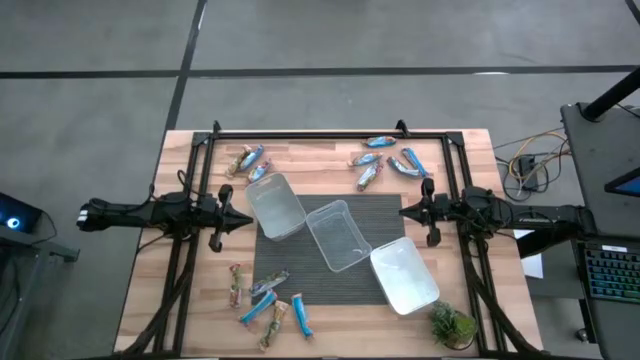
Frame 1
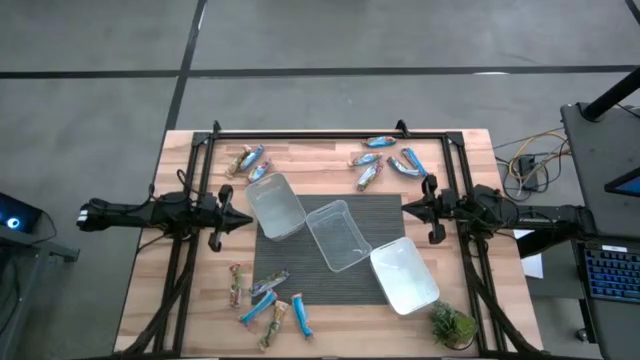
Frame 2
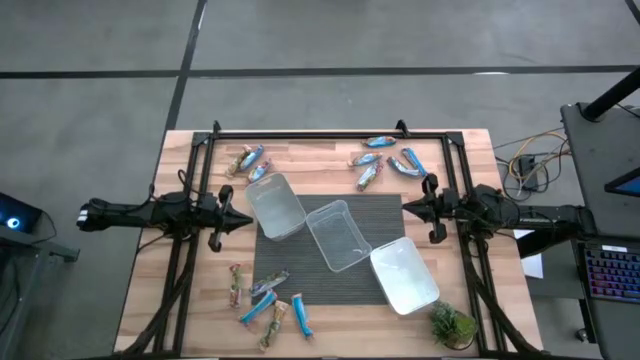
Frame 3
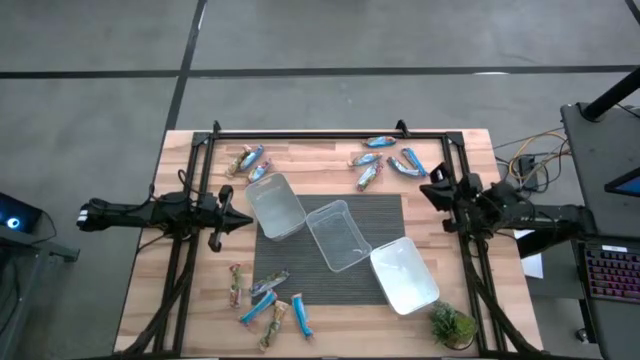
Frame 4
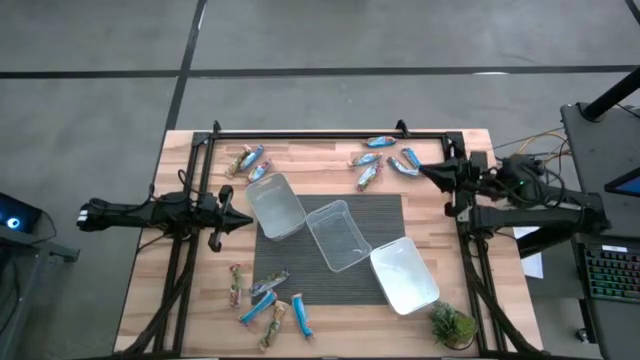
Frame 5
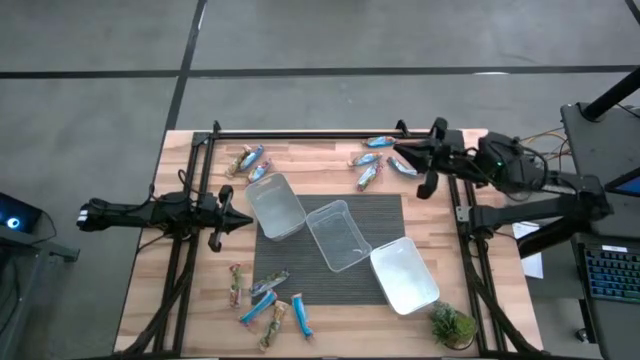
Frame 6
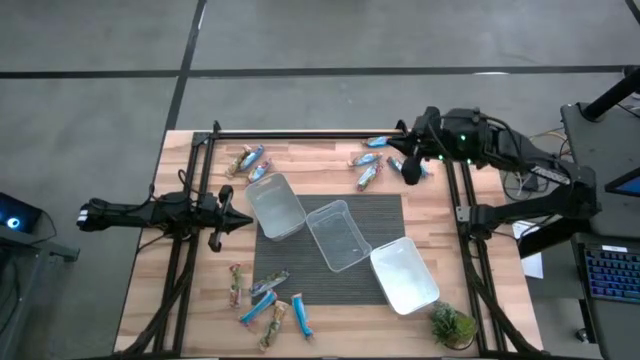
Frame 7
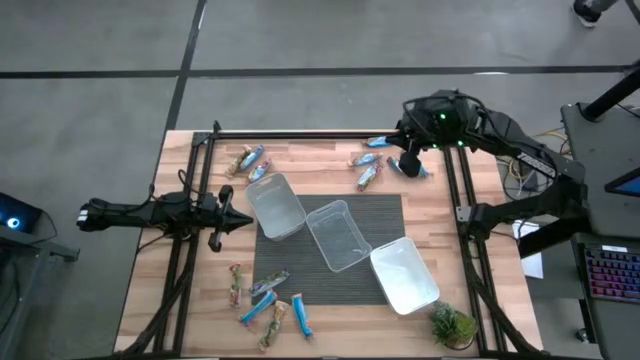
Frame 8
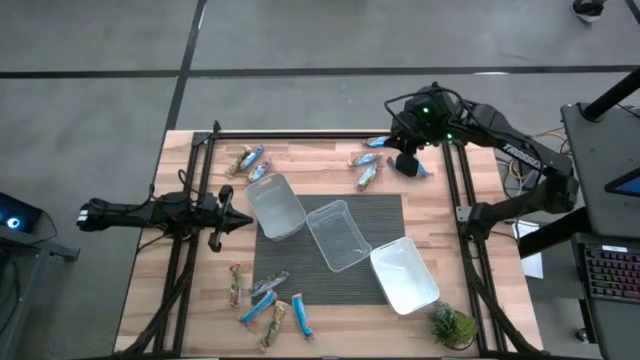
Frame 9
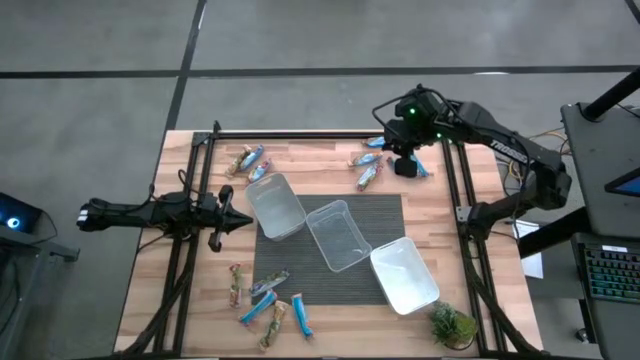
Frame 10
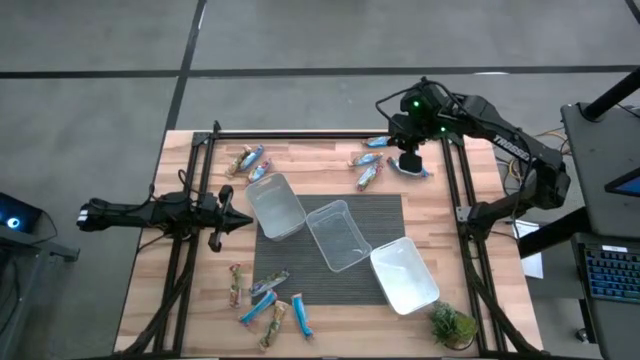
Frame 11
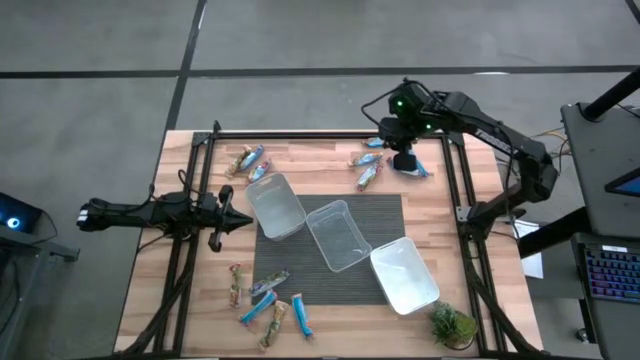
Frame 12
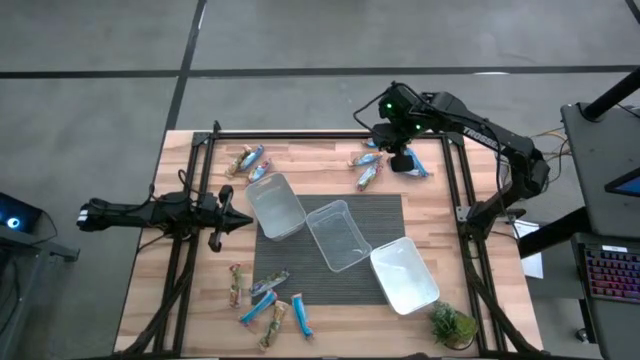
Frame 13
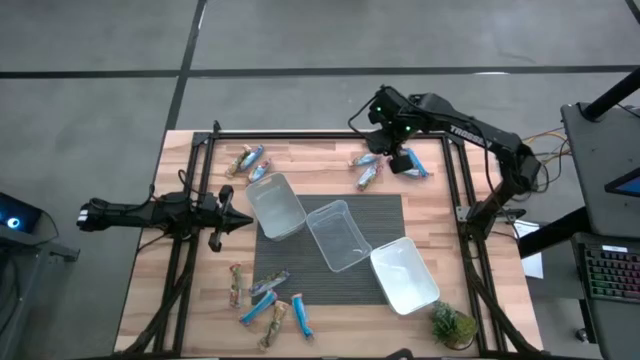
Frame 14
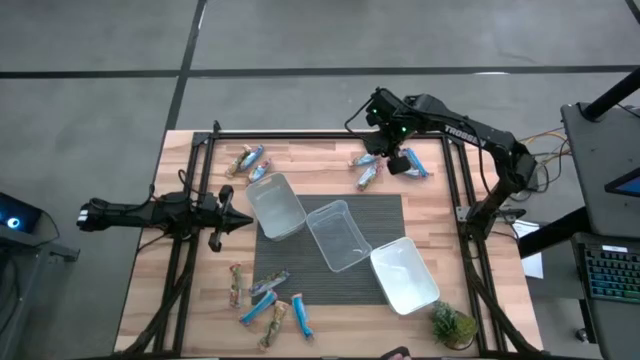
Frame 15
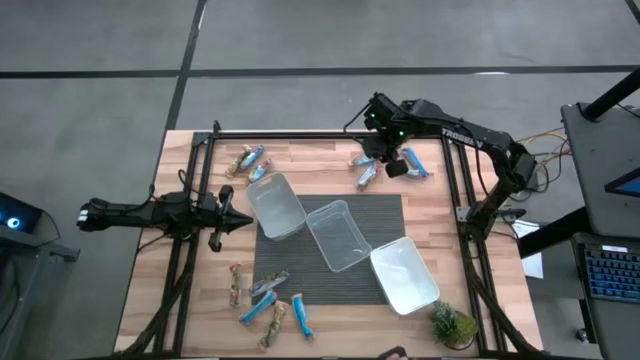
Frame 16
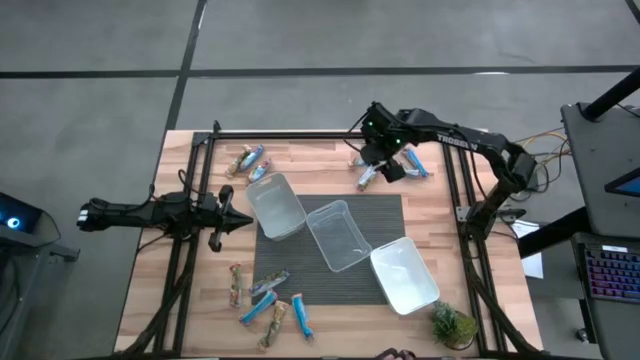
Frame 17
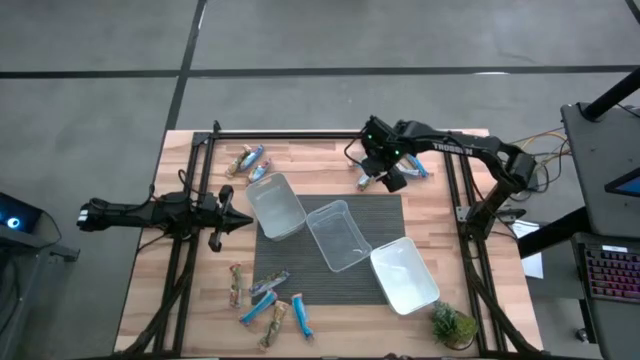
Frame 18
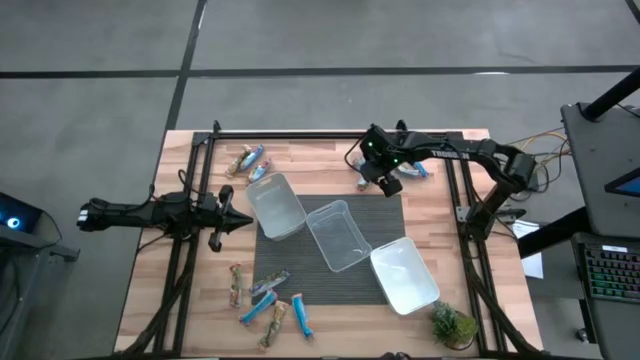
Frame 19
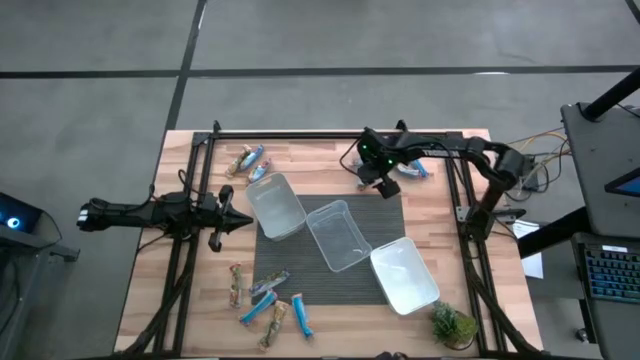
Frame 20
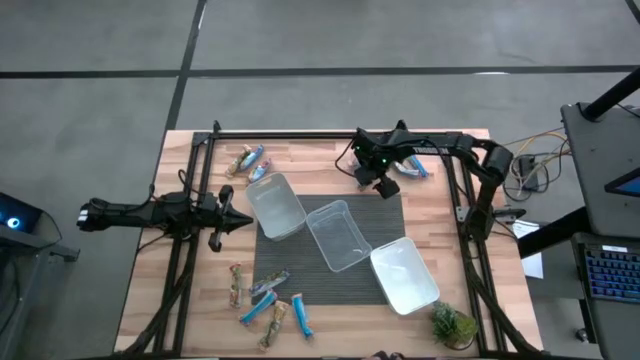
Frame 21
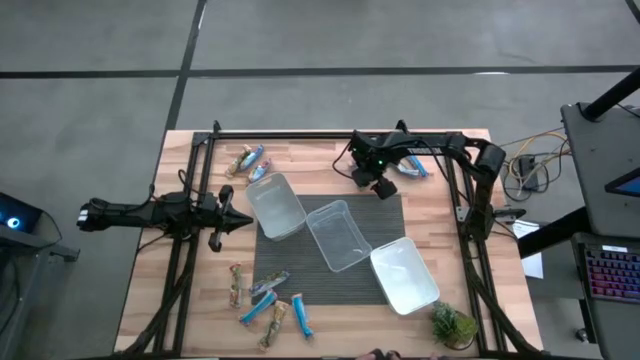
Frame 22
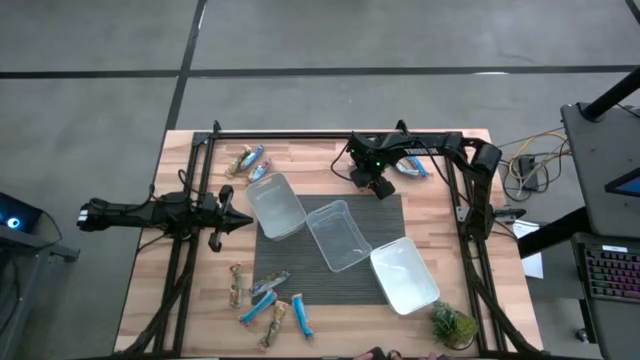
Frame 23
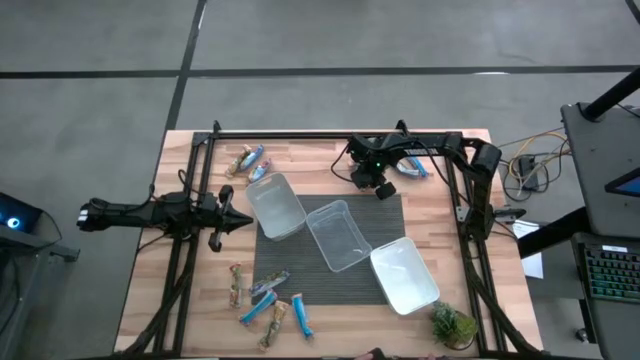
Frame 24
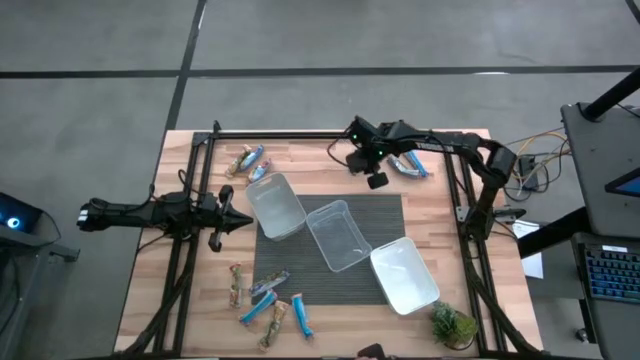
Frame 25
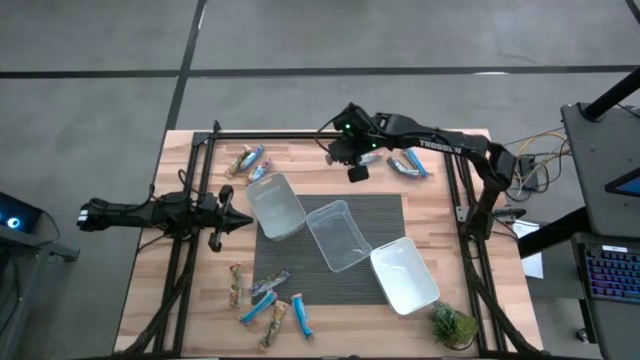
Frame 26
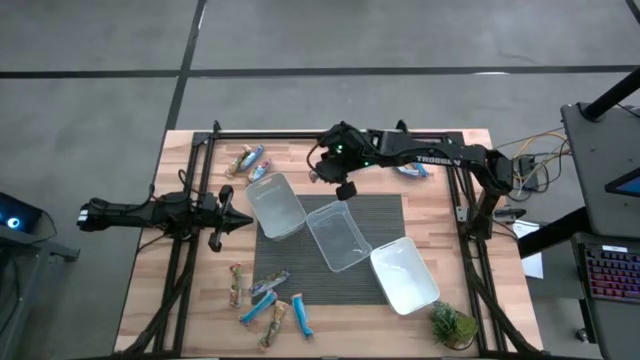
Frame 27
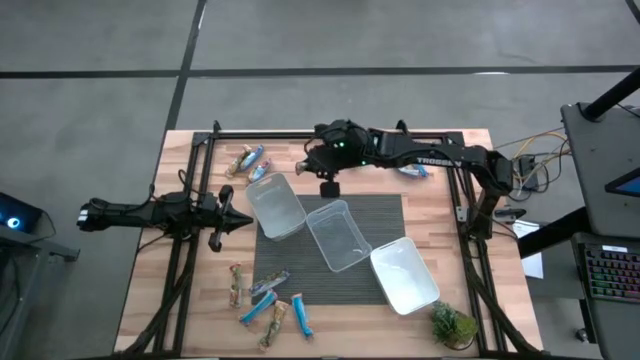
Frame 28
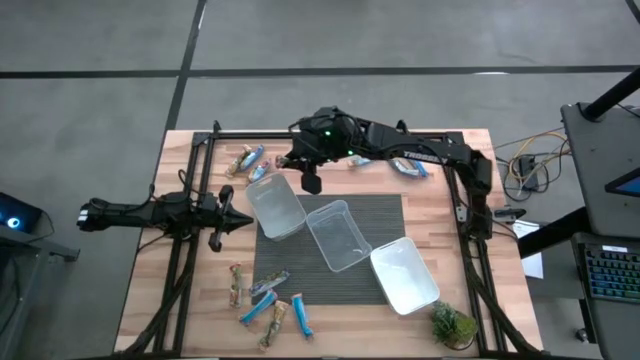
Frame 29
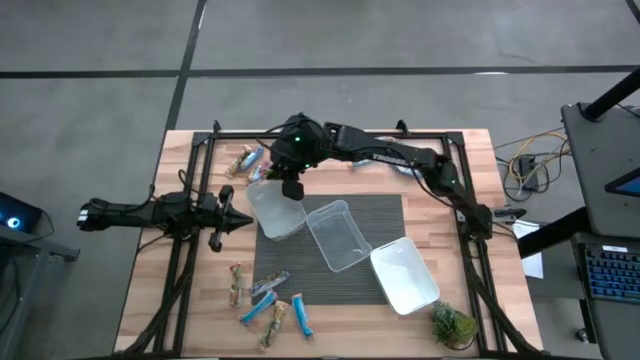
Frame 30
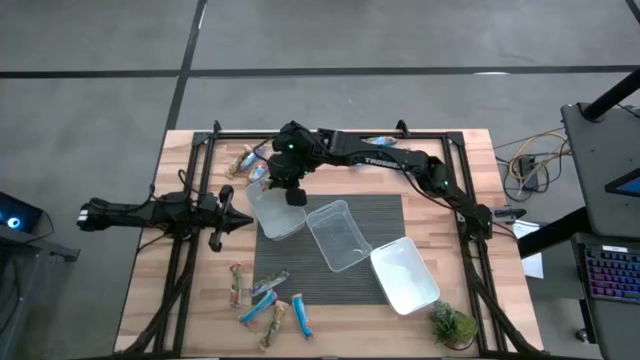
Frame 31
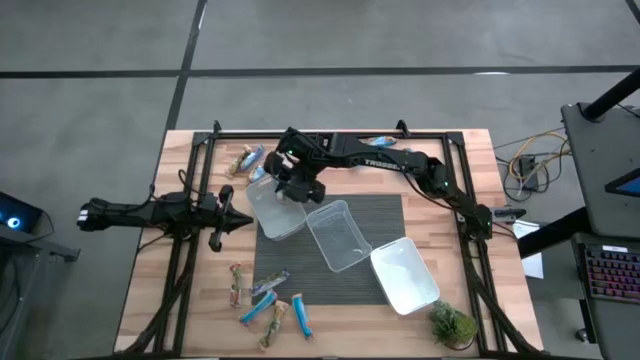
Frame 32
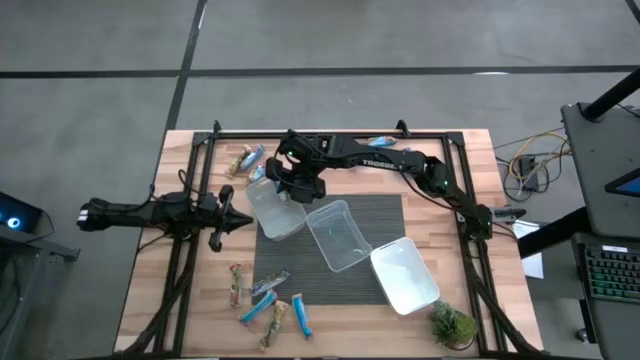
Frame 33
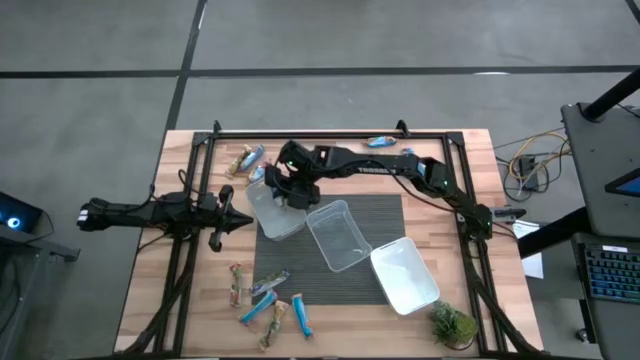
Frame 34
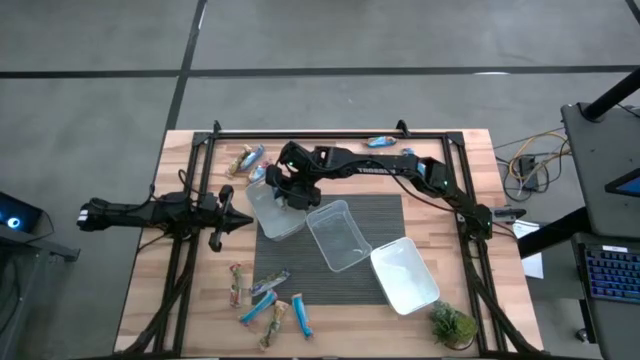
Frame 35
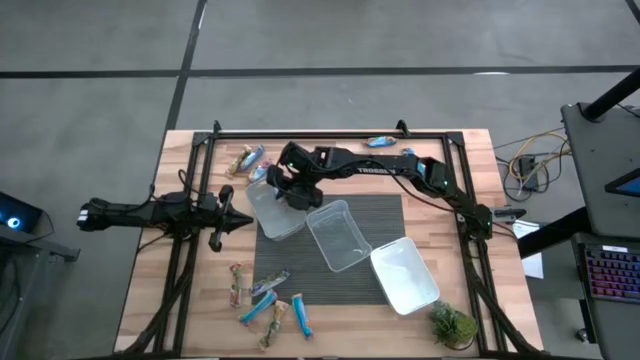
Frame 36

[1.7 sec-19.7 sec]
Task: Pick and place Granola Bars by type
Put the red granola bar into the gray bin

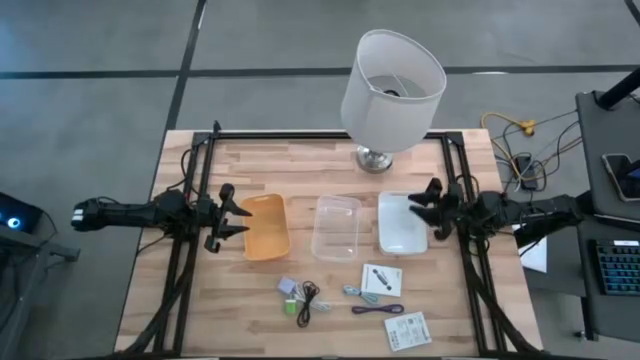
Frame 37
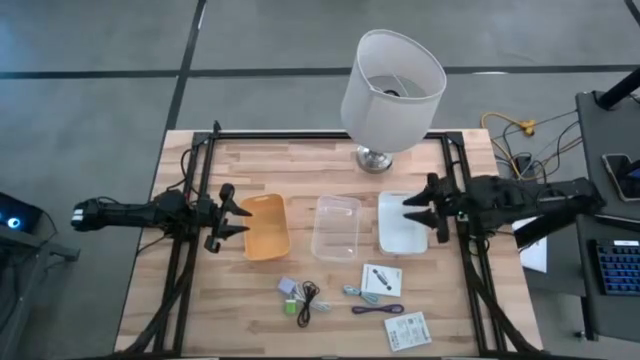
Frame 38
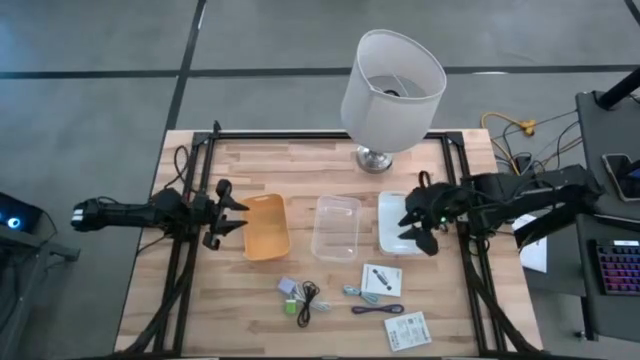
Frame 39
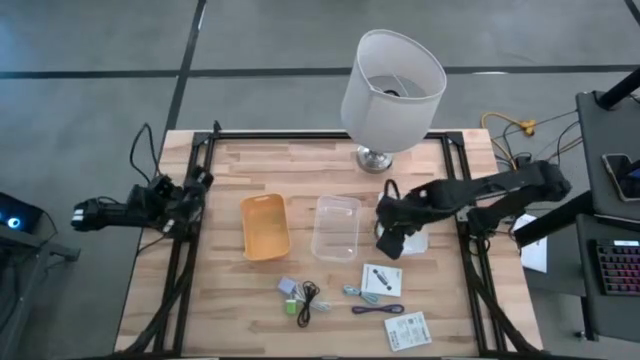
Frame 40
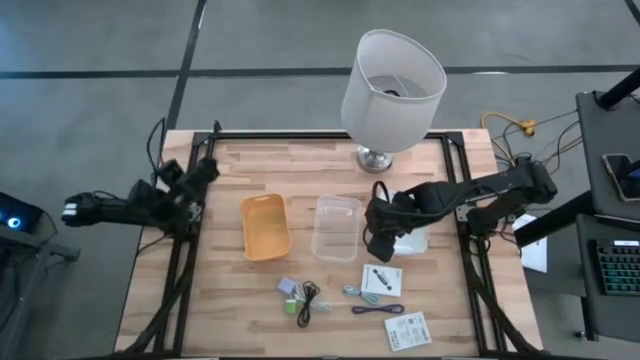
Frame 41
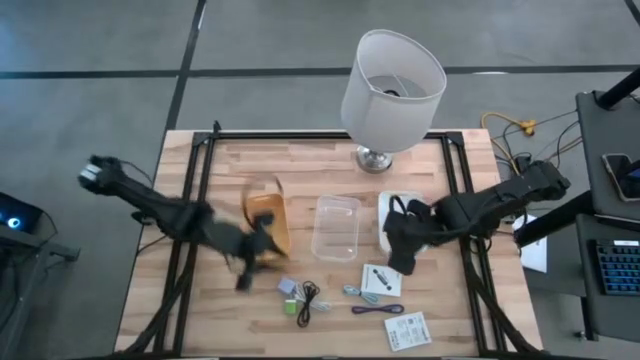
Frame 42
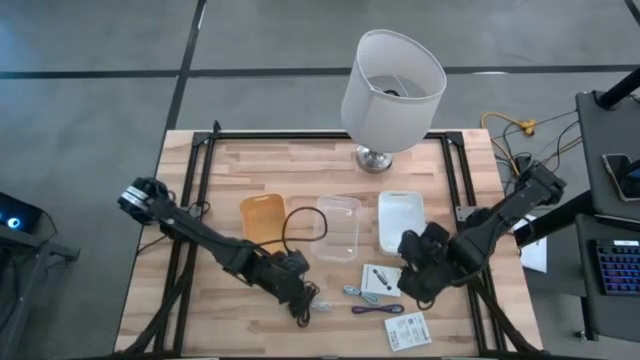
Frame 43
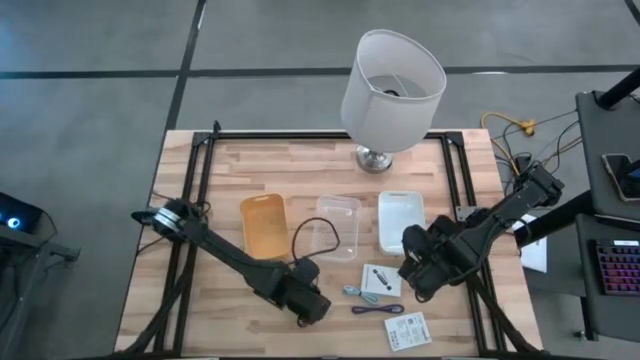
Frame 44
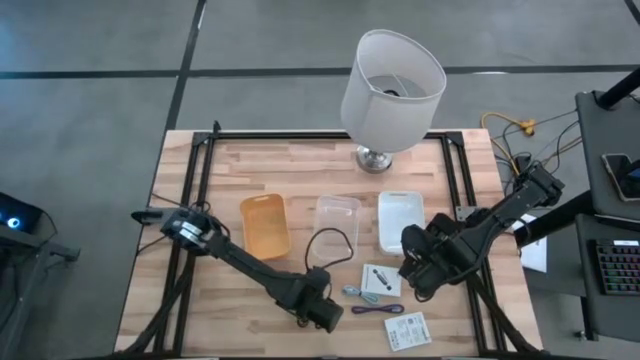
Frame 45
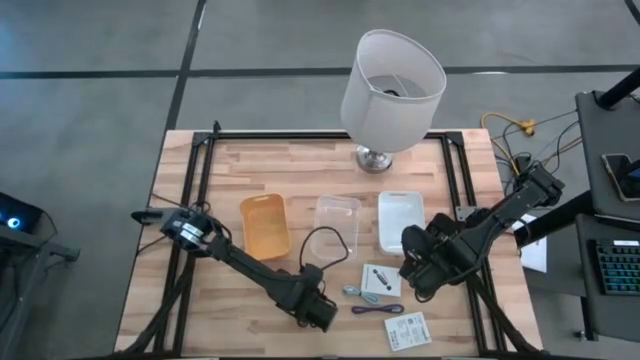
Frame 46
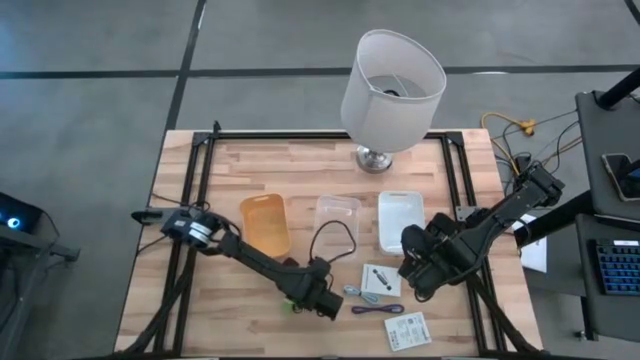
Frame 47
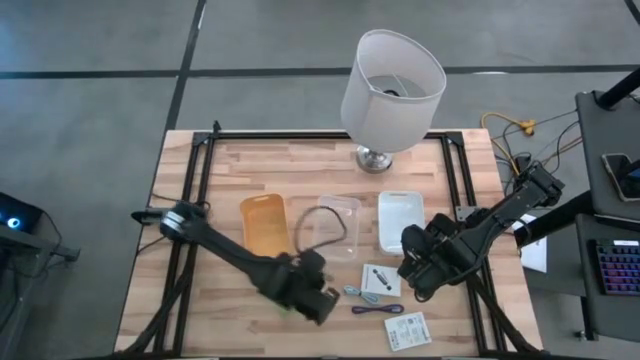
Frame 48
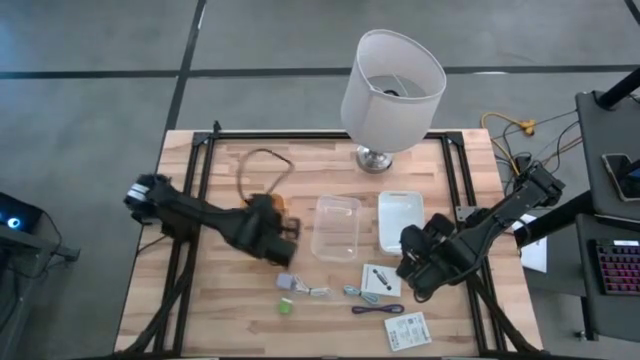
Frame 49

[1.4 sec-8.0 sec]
Task: Pick and place items into bin
Put the black charger cable into the yellow bin
